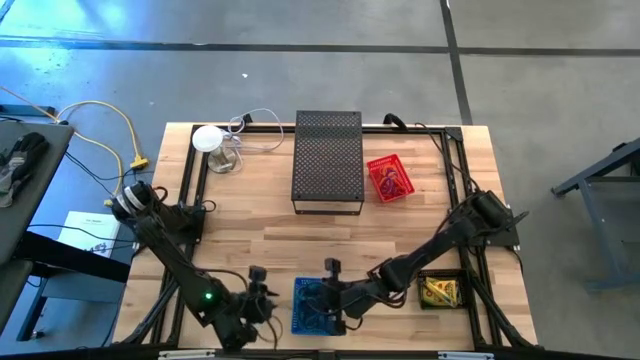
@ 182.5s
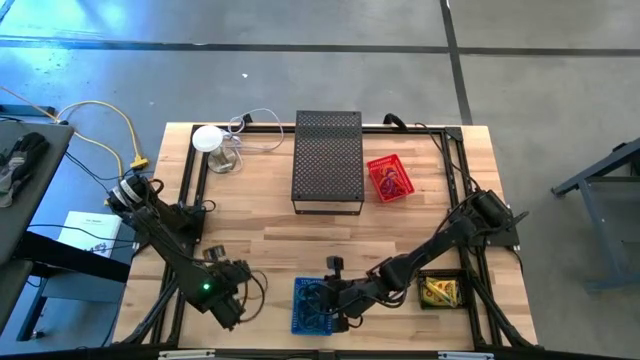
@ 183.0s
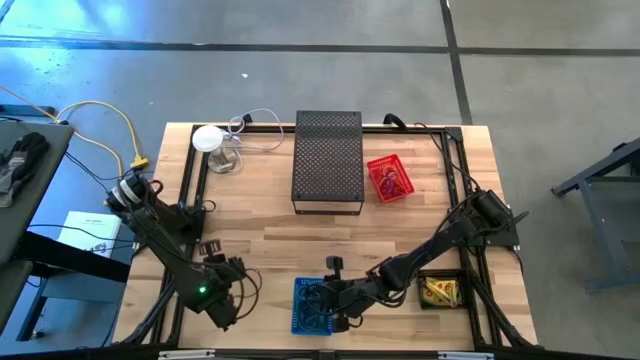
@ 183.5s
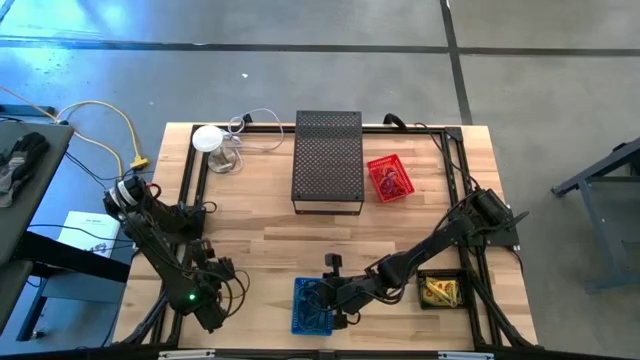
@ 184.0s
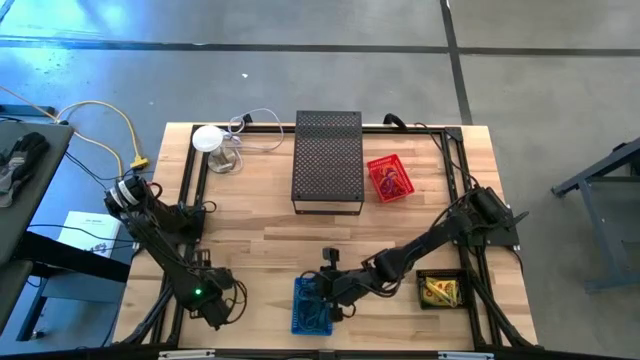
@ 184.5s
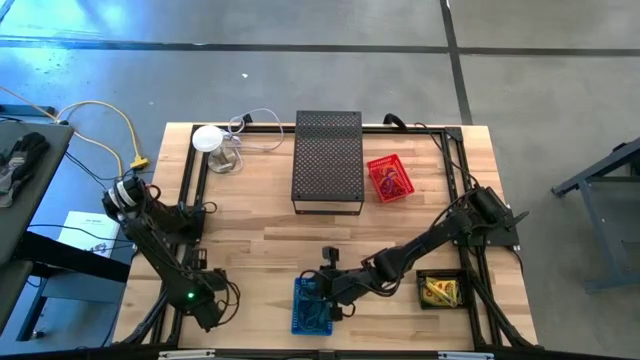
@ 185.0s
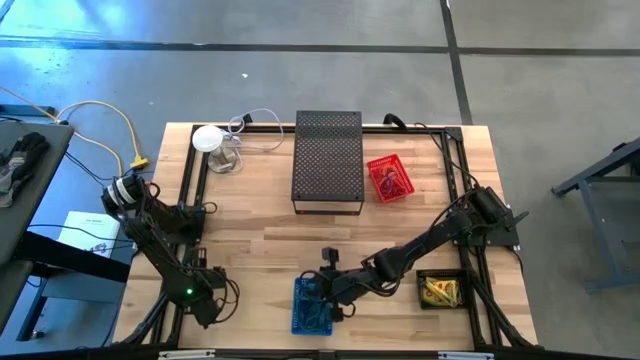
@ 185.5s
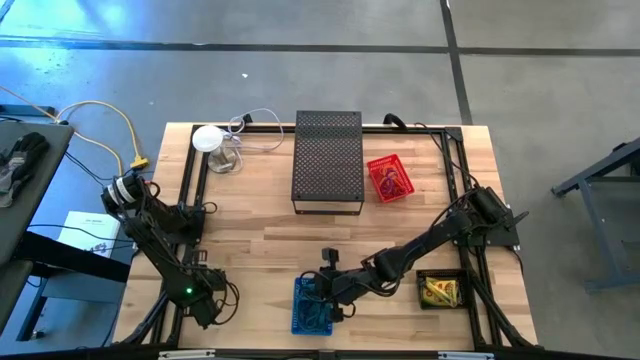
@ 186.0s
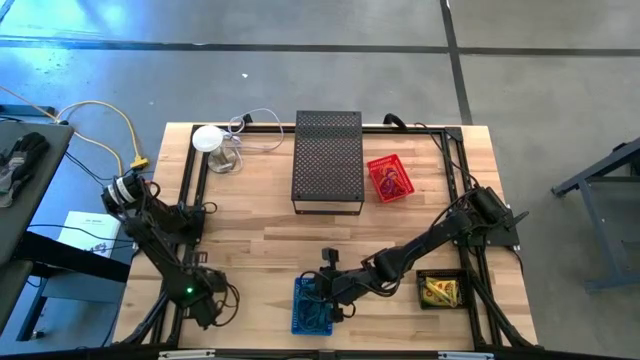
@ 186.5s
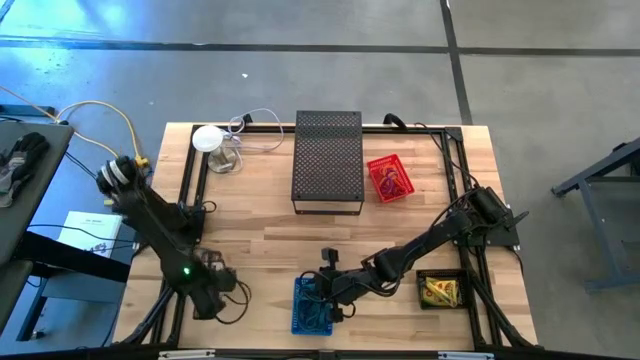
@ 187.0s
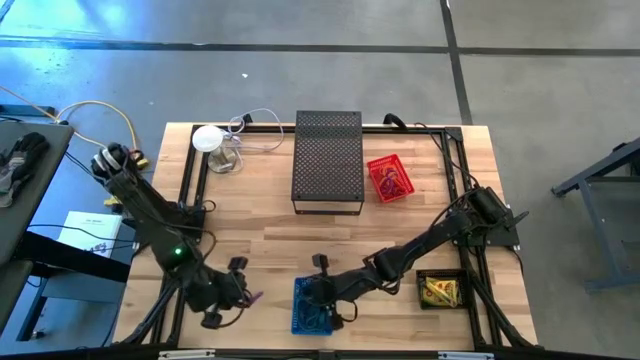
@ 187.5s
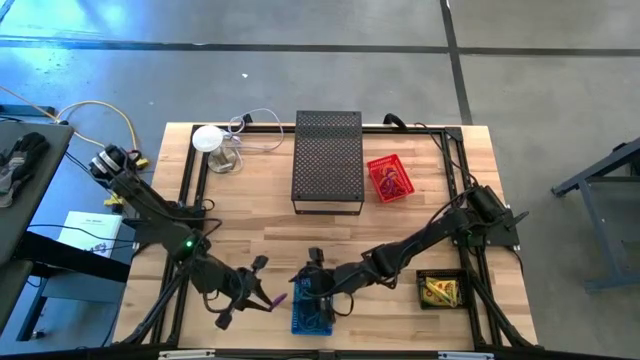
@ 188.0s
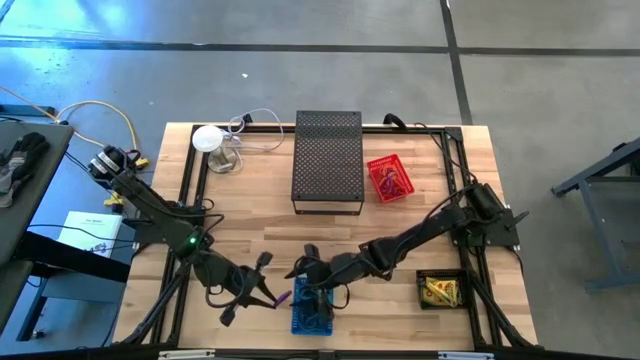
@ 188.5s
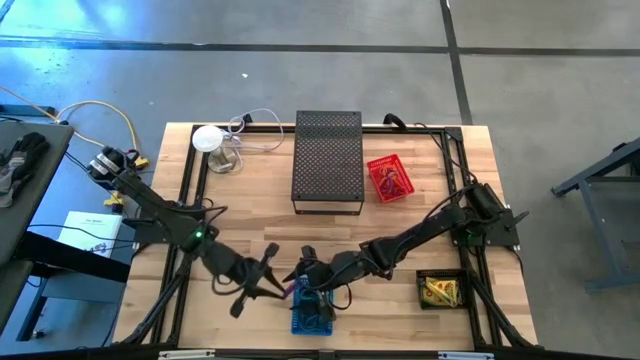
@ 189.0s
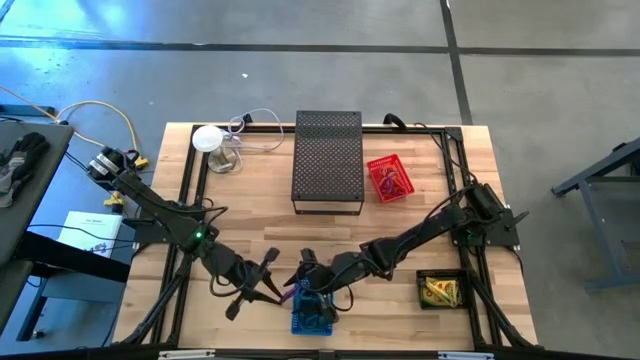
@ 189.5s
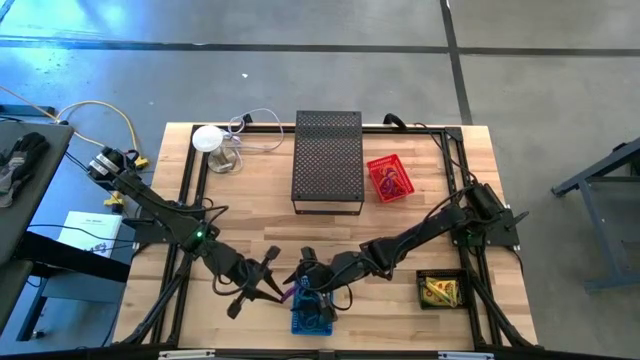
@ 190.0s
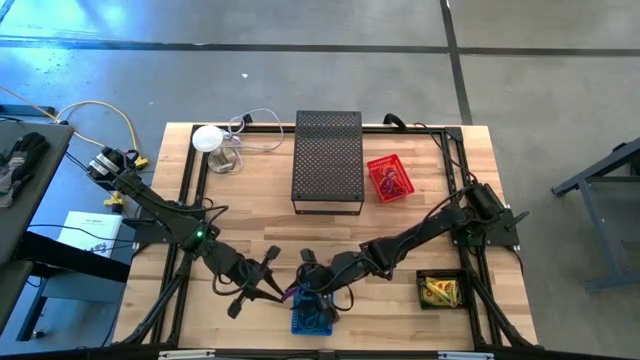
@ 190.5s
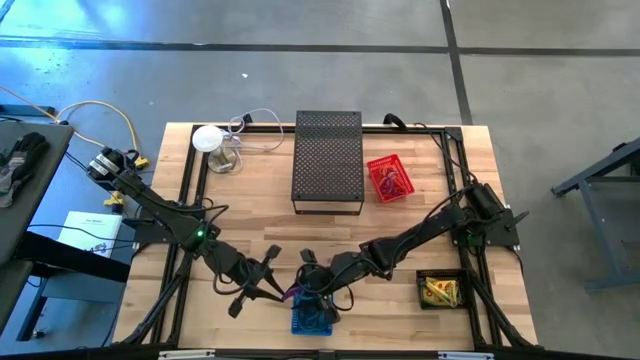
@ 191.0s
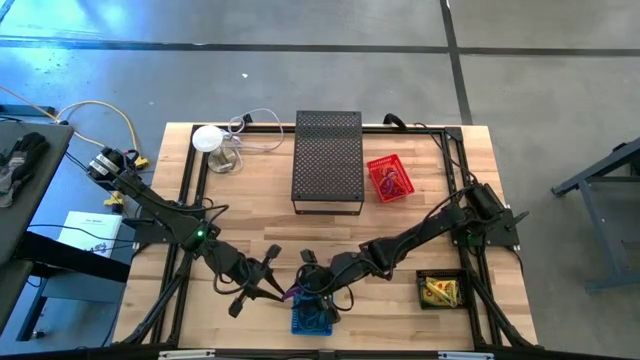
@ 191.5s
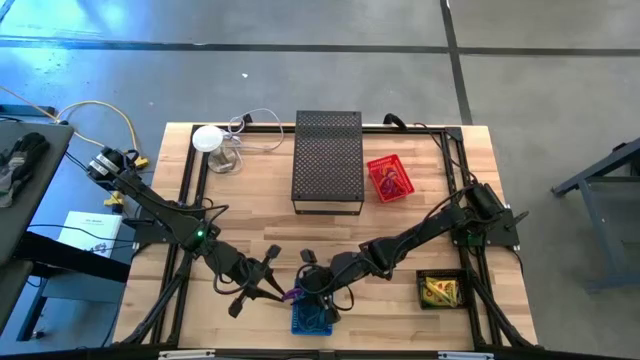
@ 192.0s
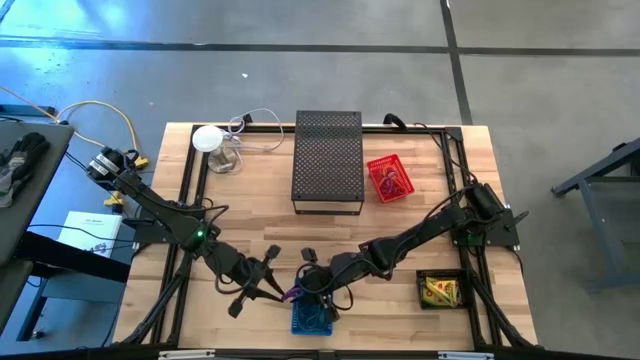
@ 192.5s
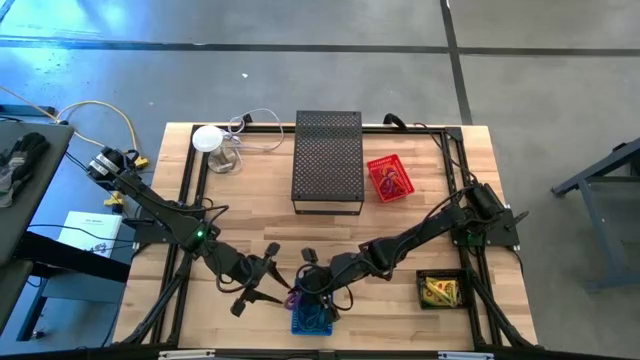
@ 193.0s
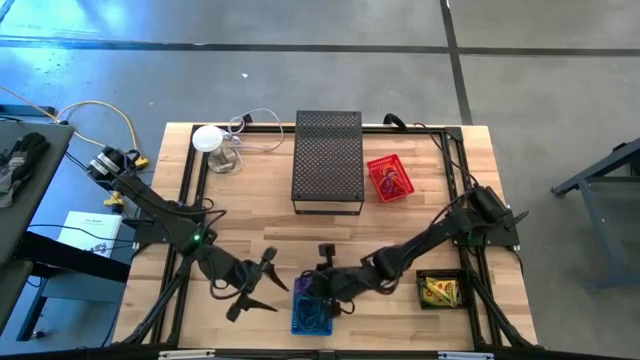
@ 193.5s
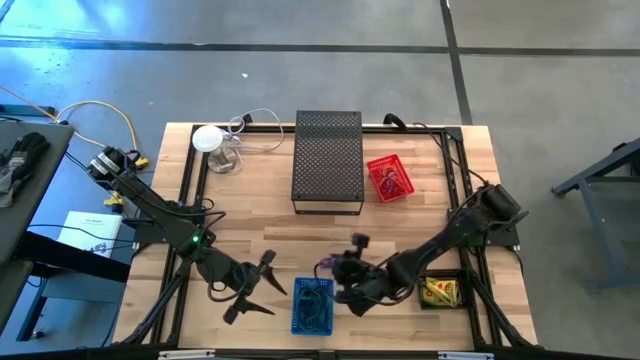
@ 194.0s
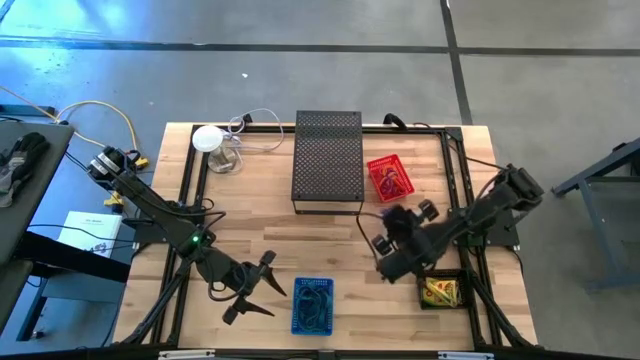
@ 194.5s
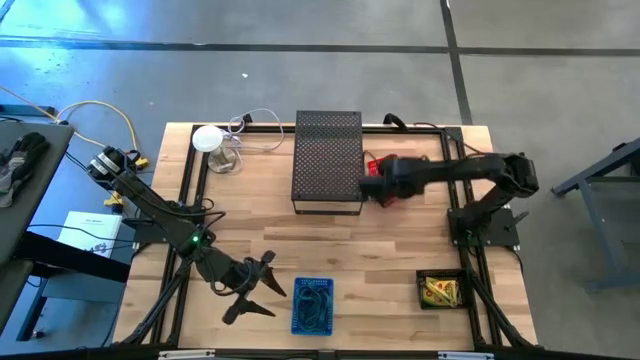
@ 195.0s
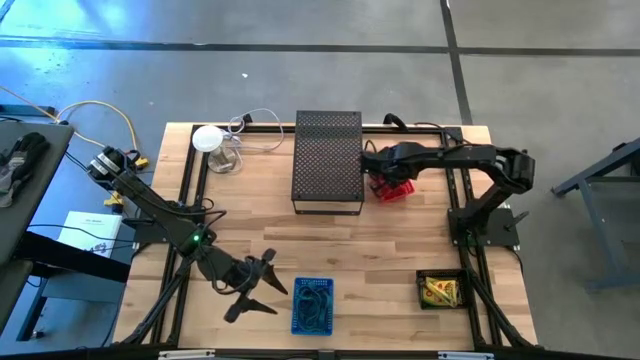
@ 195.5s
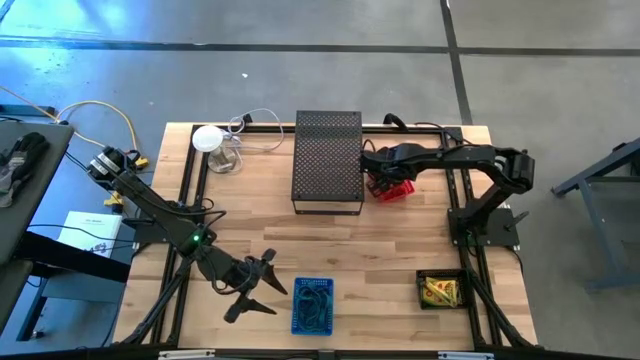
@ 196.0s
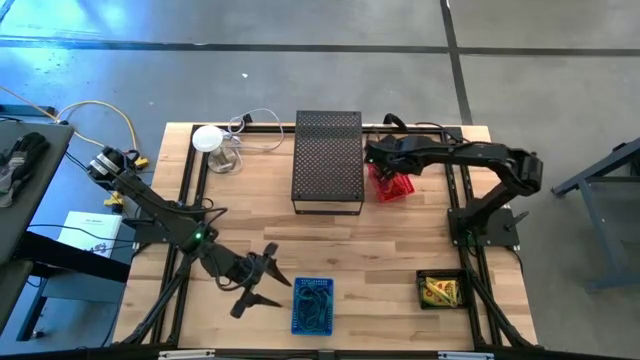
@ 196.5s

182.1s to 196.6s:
Task: Pick & Place Office Desk Supplies
Put the violet spring keychains into the red bin

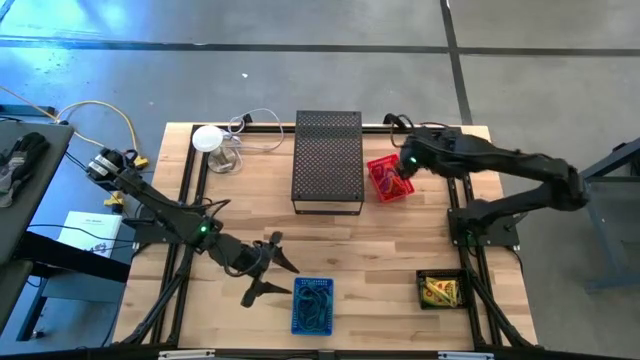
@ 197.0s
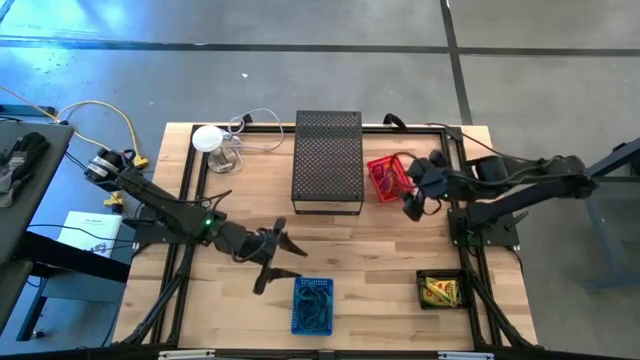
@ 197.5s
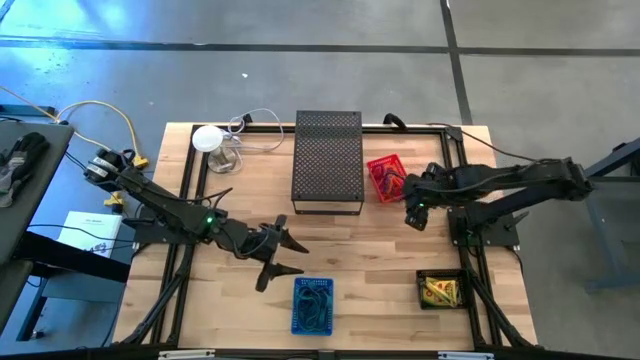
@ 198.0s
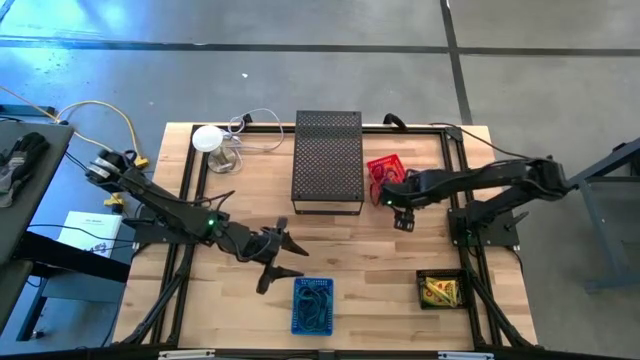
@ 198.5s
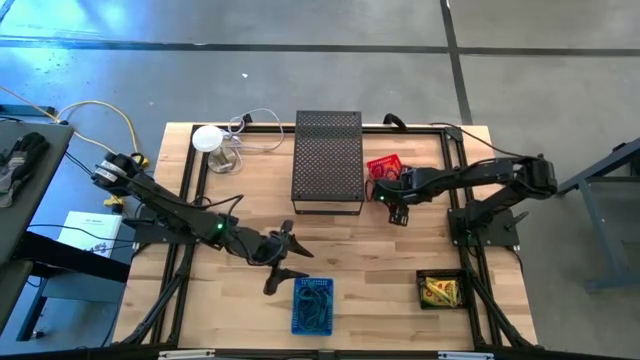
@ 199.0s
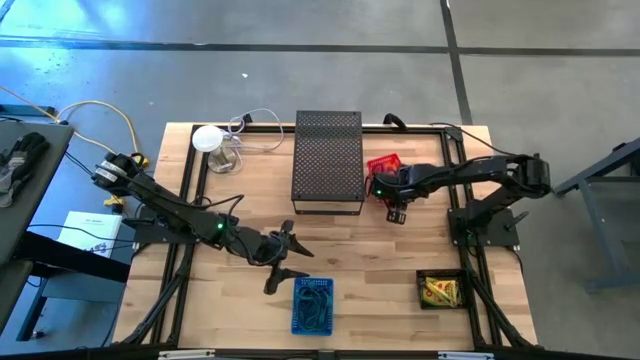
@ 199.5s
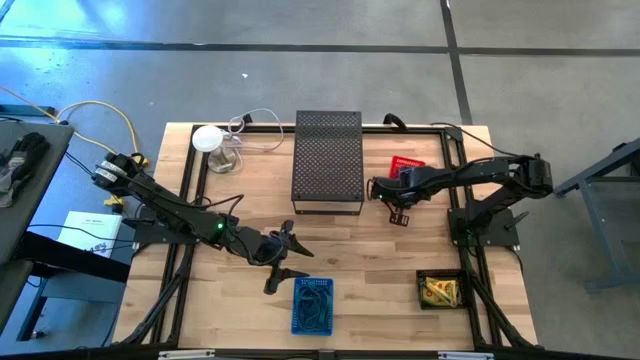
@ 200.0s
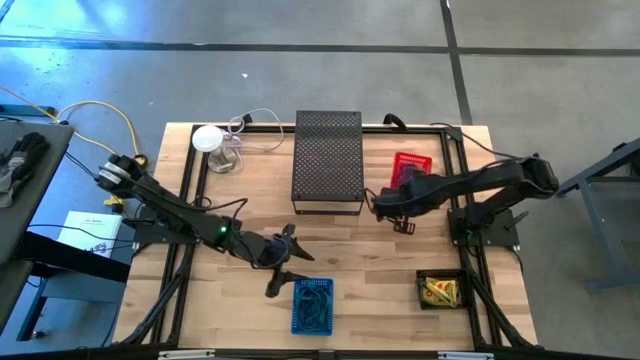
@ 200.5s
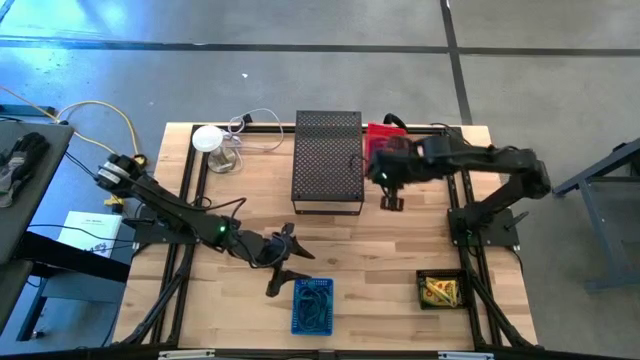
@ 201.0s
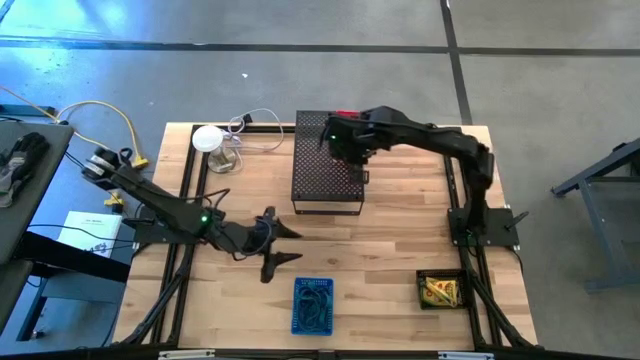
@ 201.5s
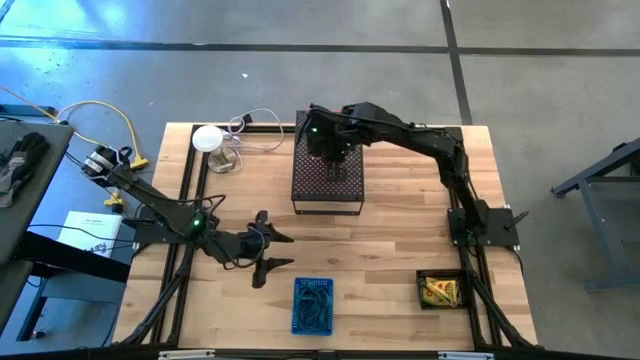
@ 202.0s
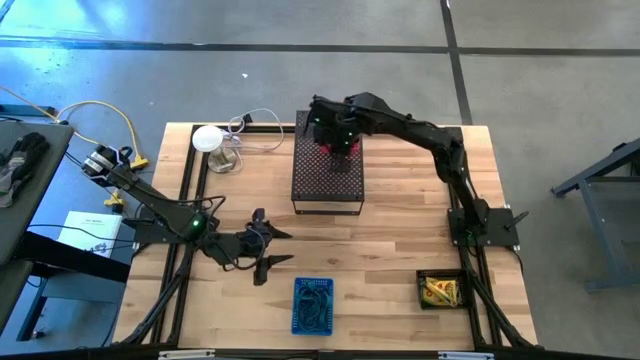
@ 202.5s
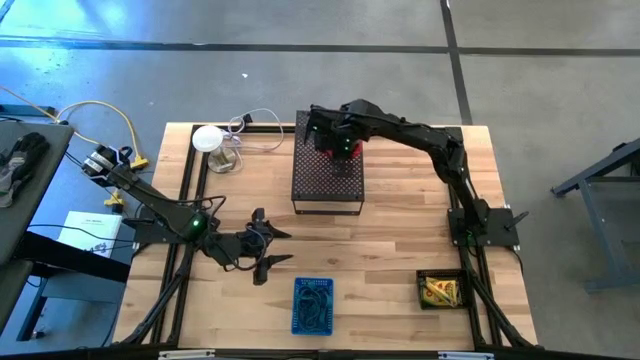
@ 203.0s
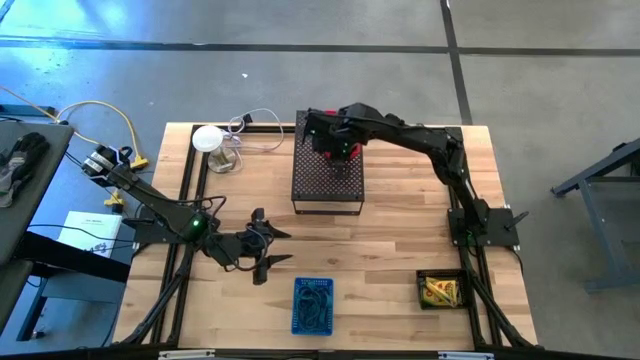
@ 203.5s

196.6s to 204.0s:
Put the red bin with spring keychain on the shelf
